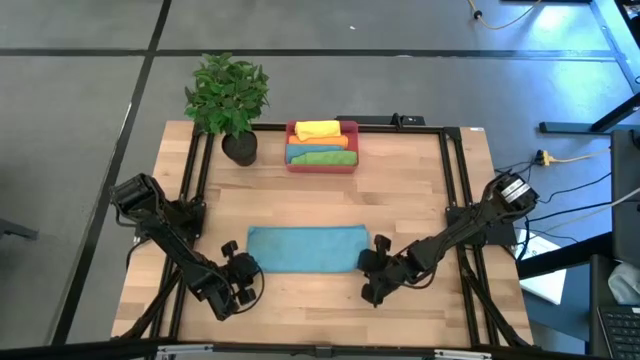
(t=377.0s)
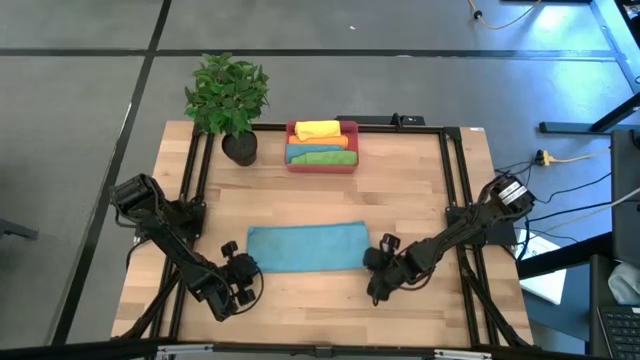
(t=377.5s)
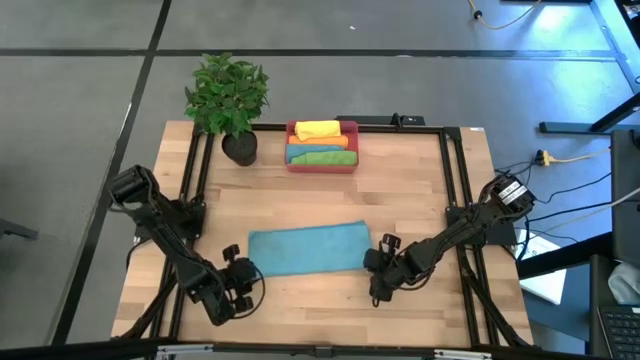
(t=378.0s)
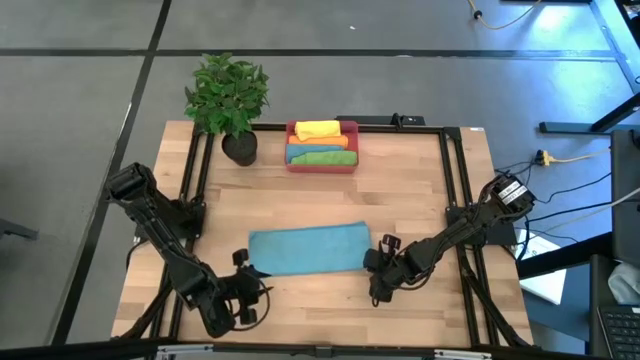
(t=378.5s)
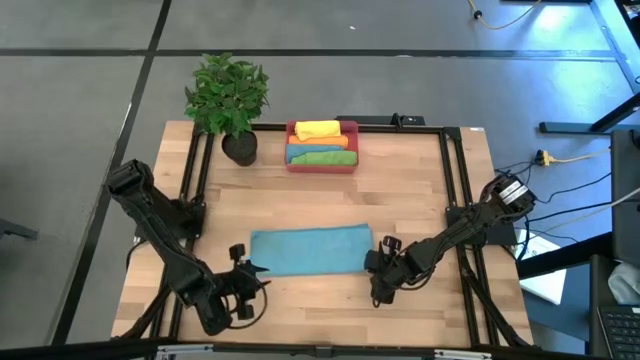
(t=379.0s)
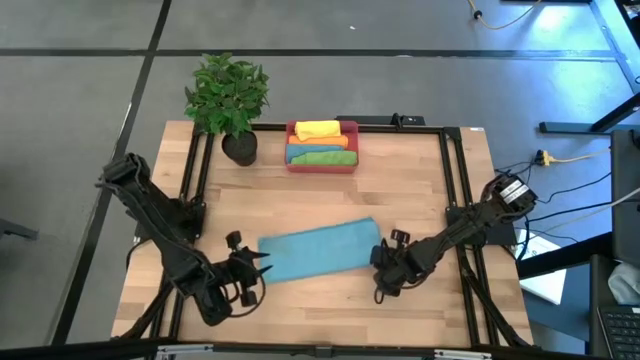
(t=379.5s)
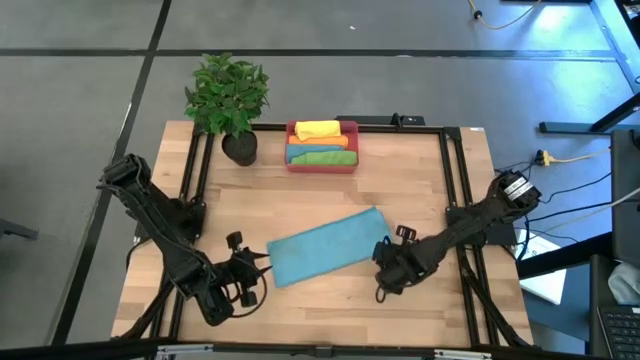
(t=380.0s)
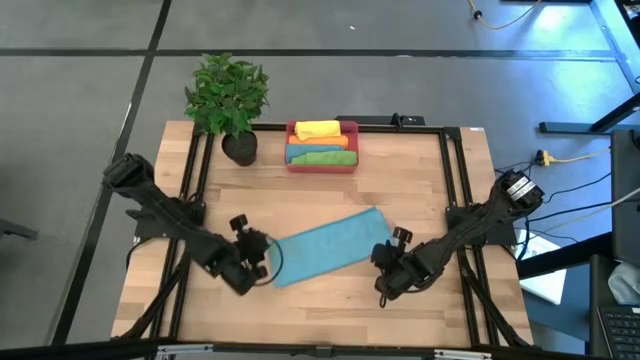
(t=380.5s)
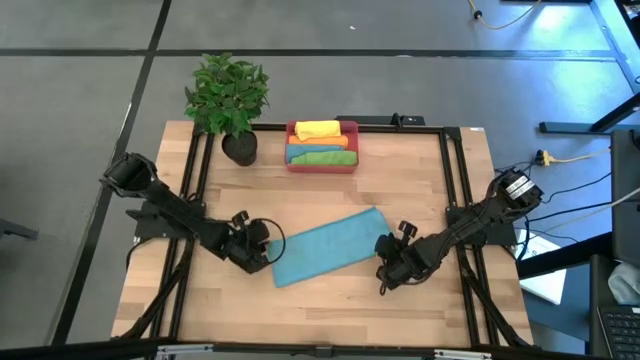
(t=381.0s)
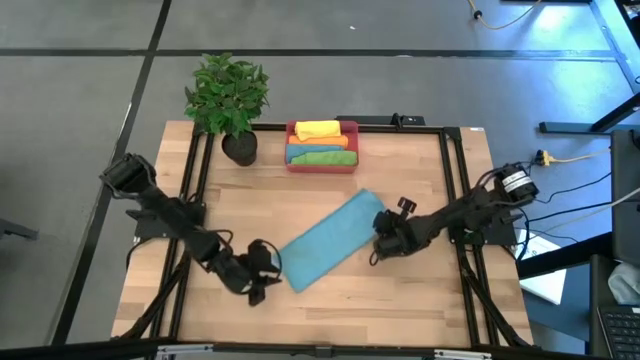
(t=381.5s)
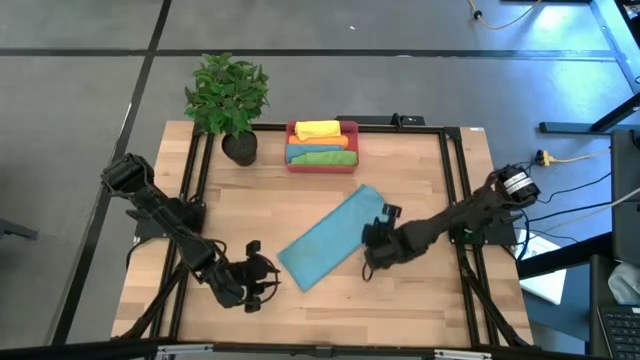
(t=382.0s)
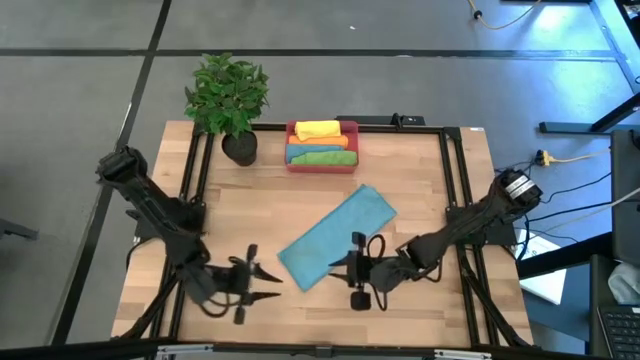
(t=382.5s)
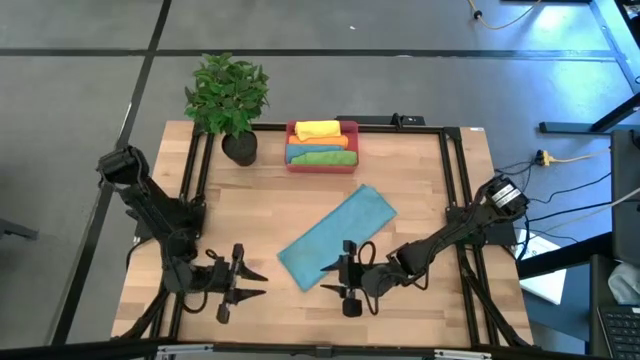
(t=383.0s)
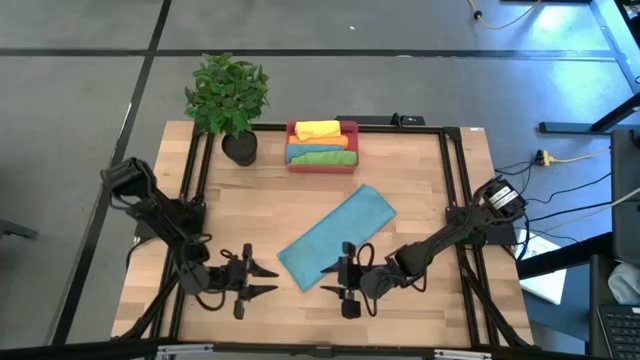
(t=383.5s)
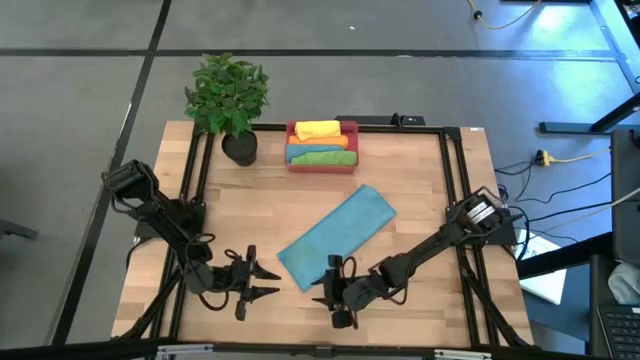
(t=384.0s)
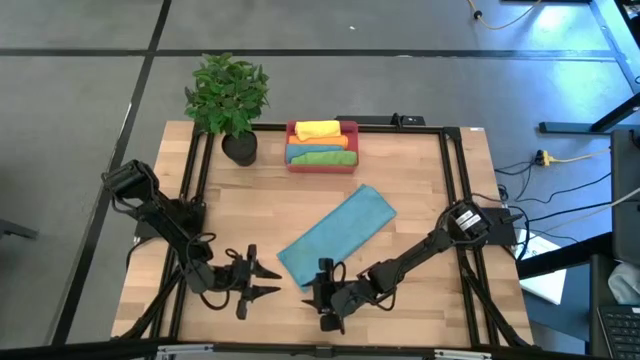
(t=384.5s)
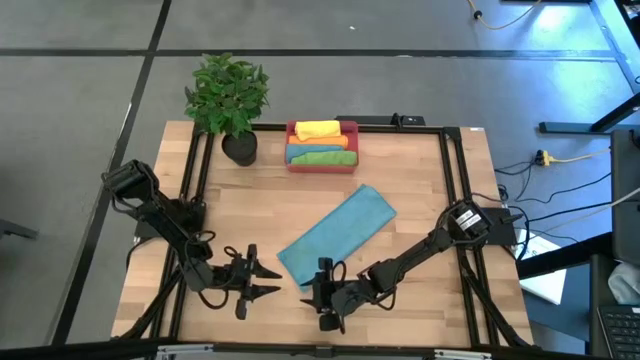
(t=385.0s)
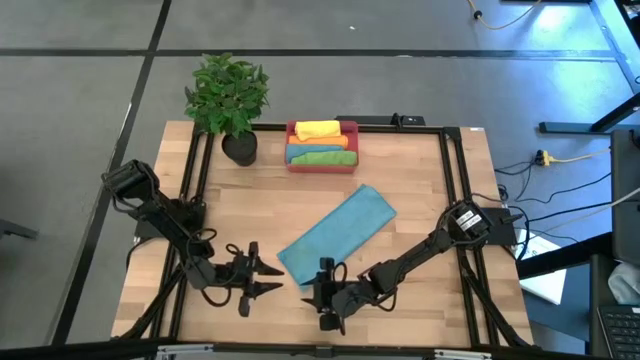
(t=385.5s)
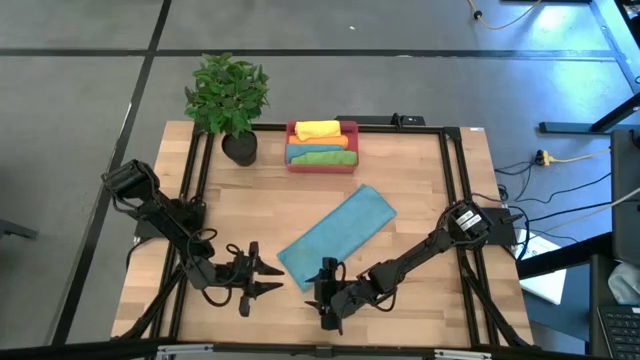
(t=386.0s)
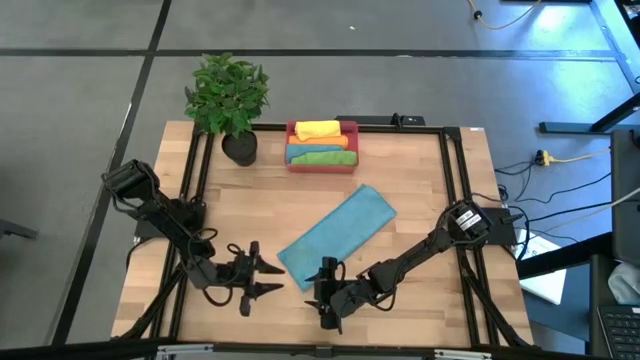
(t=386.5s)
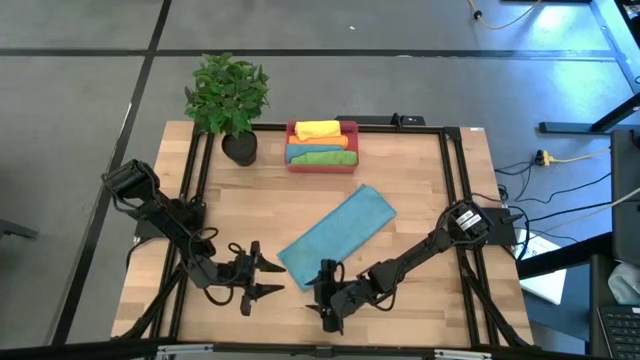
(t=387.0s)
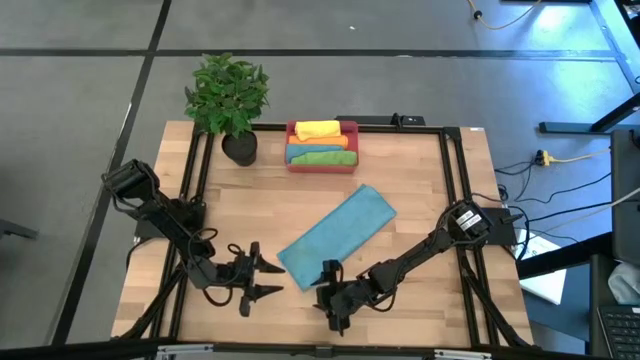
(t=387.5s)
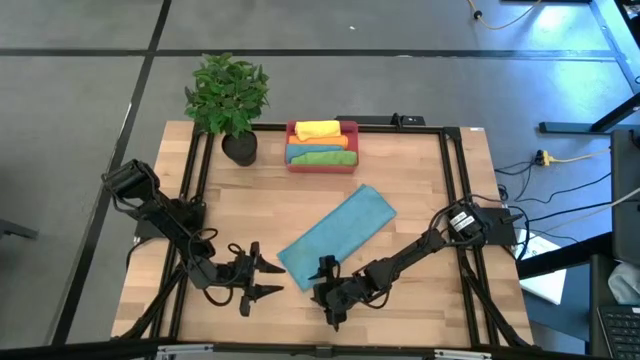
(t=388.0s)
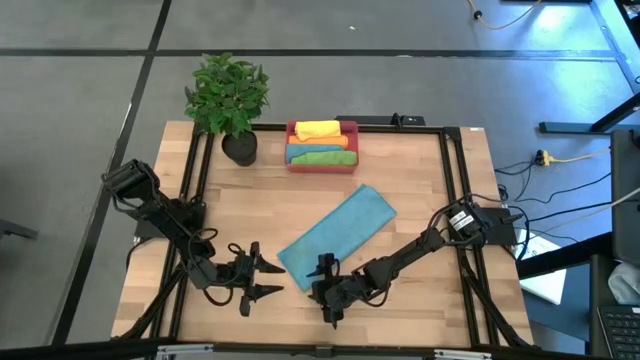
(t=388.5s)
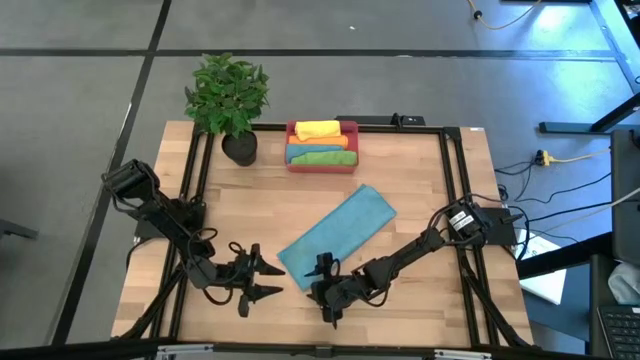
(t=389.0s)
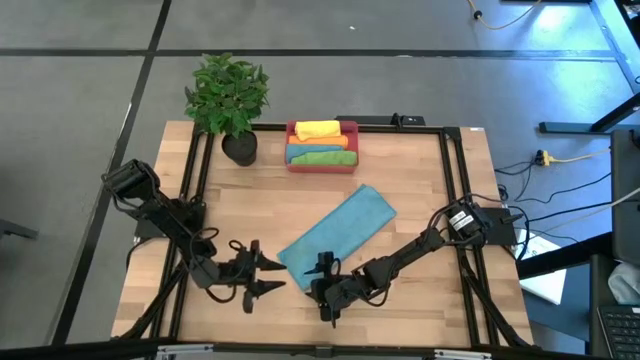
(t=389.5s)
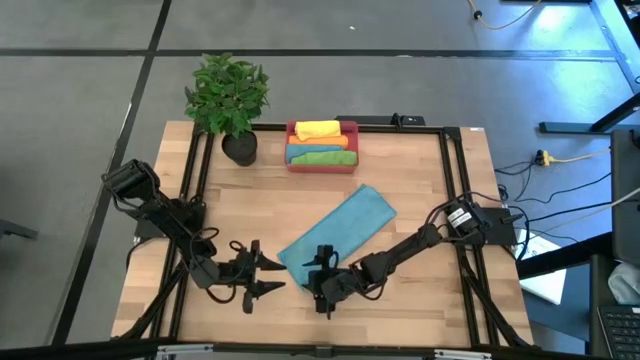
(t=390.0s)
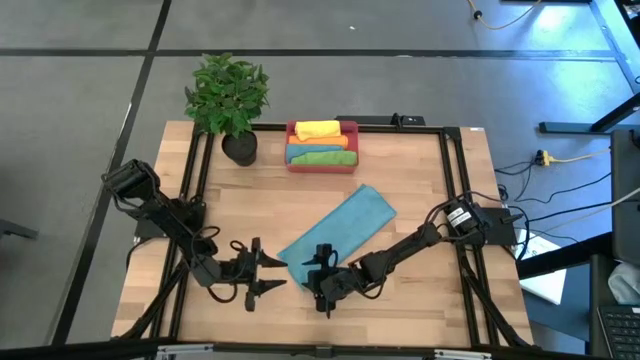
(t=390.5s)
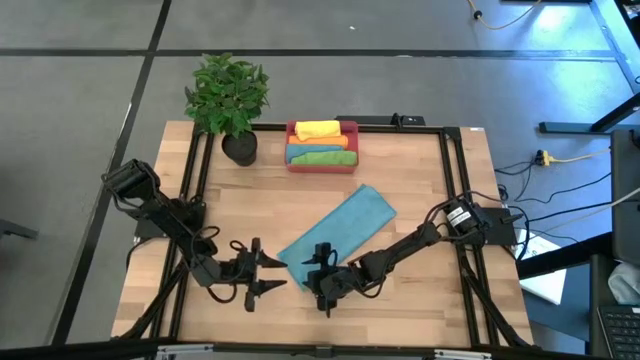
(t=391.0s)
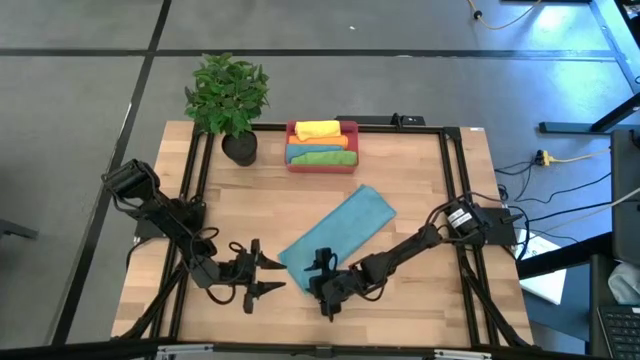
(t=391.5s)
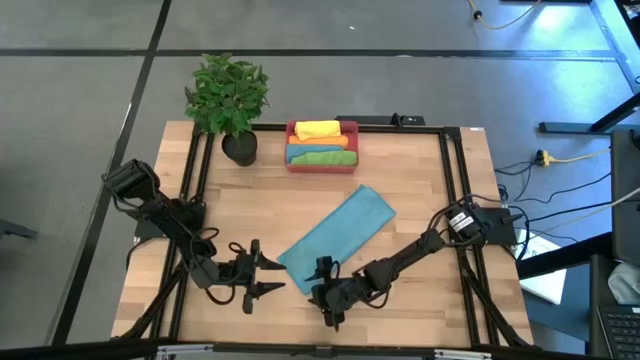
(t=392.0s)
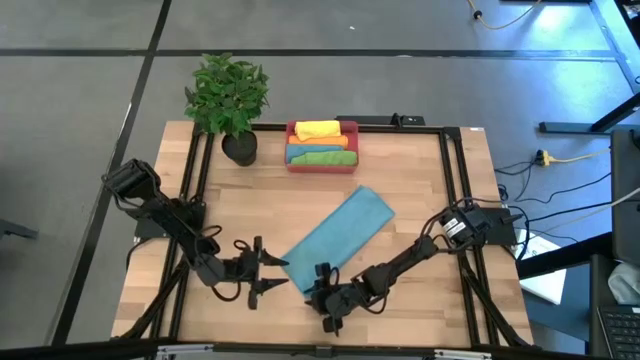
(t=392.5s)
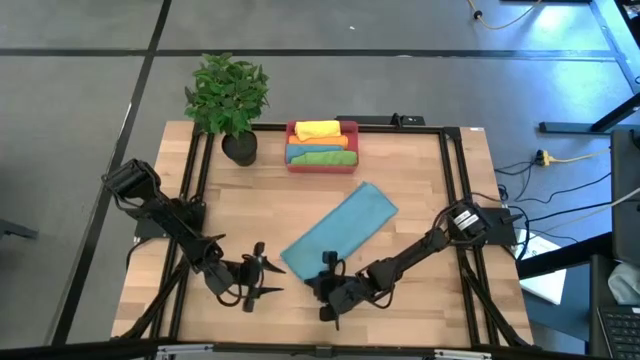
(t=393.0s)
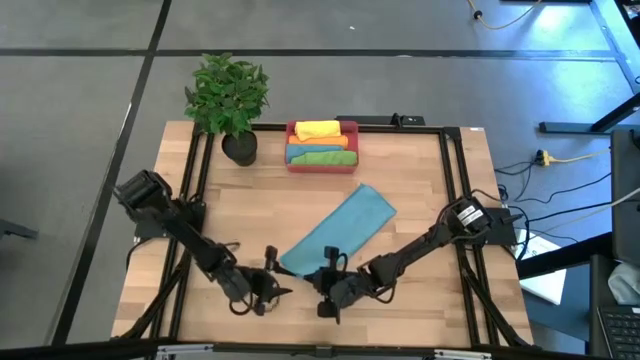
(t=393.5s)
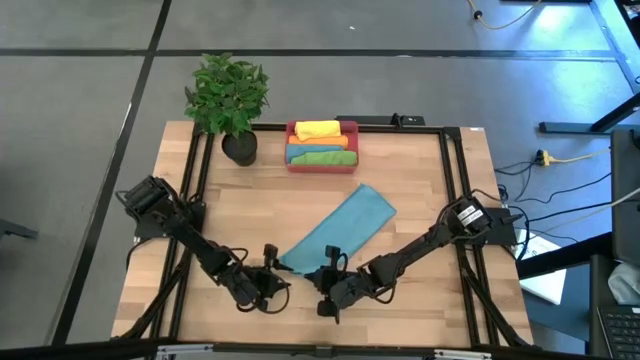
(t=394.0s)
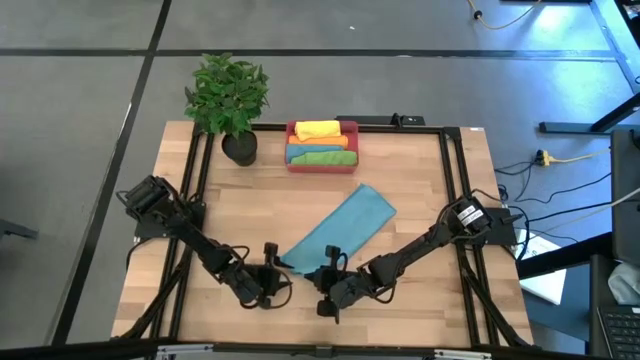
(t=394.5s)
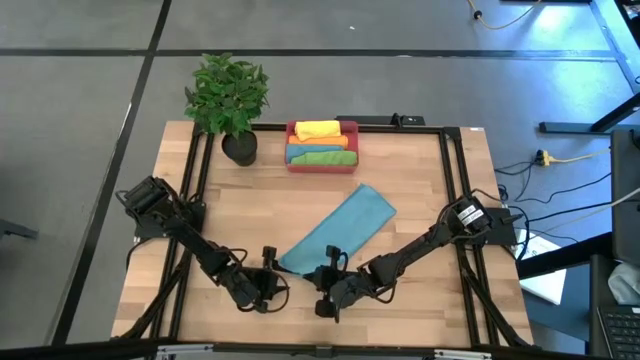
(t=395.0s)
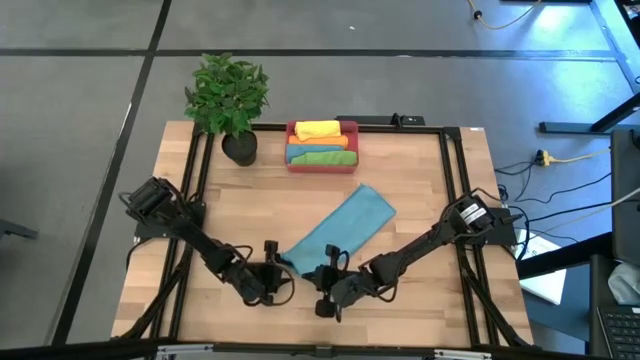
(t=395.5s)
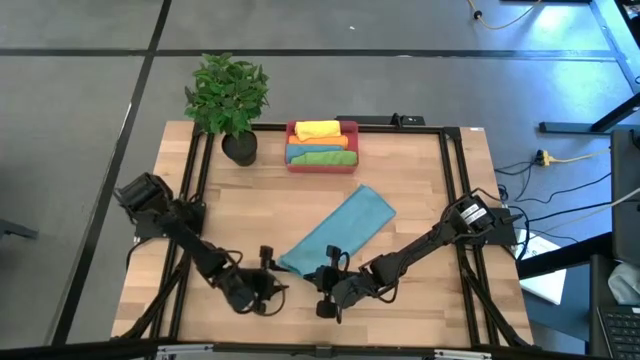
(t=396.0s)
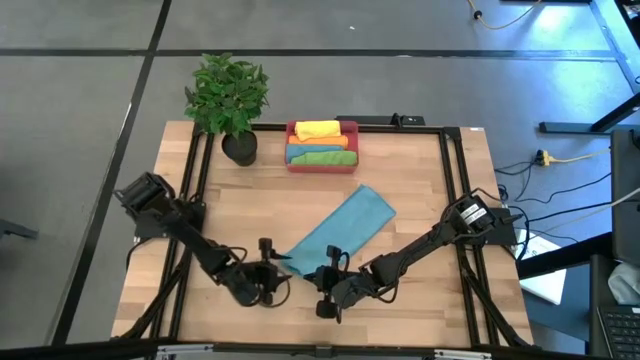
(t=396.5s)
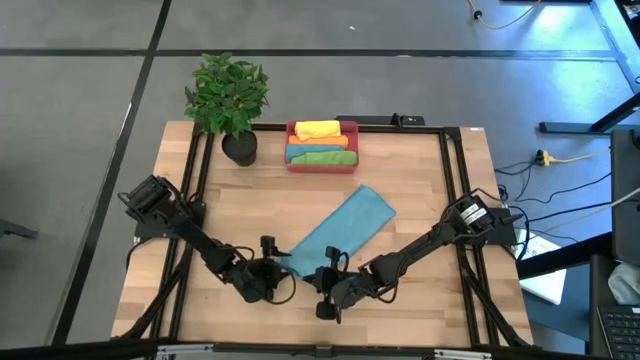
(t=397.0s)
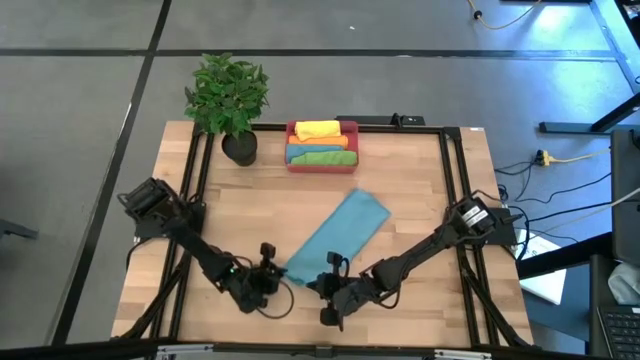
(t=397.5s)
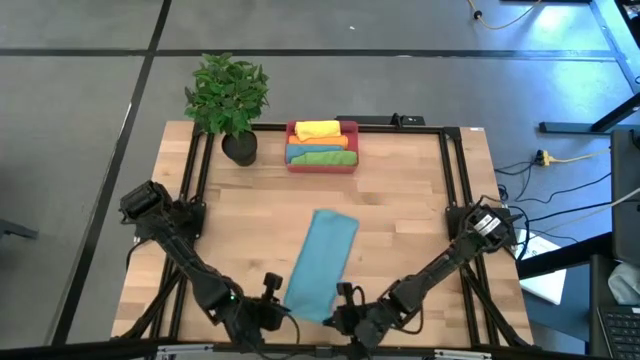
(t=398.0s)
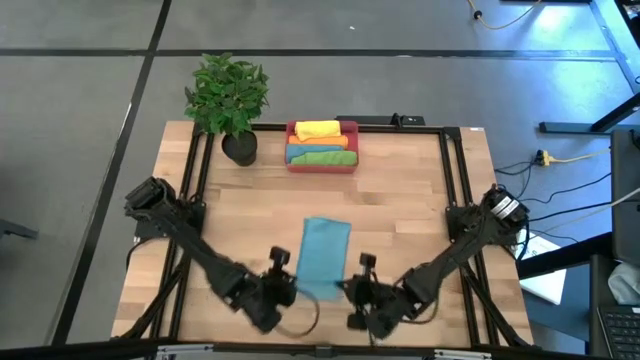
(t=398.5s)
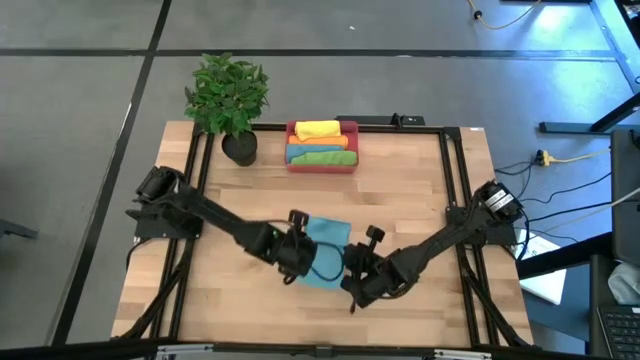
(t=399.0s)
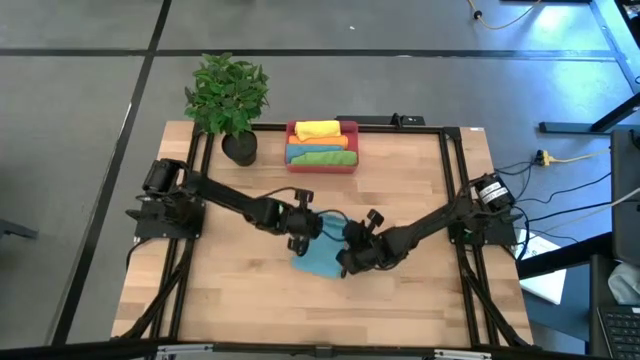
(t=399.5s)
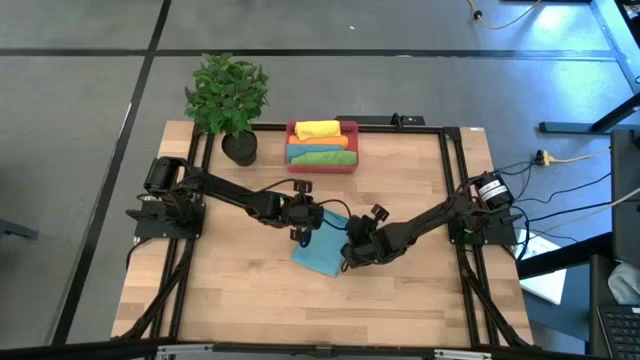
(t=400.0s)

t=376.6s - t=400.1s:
Task: Roll microfiber towels into tight, uniform cylinder then place into a basket
Fold the blue towel
